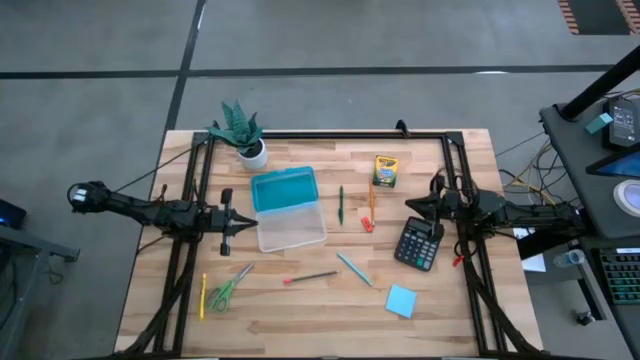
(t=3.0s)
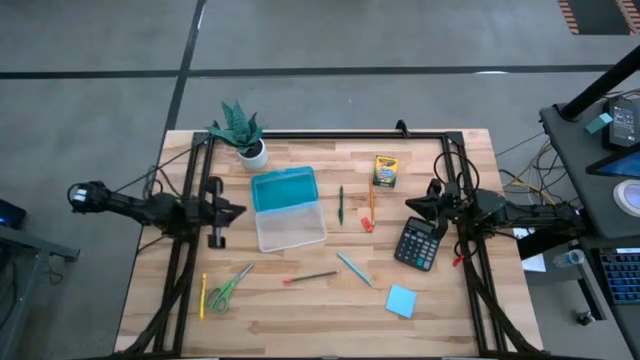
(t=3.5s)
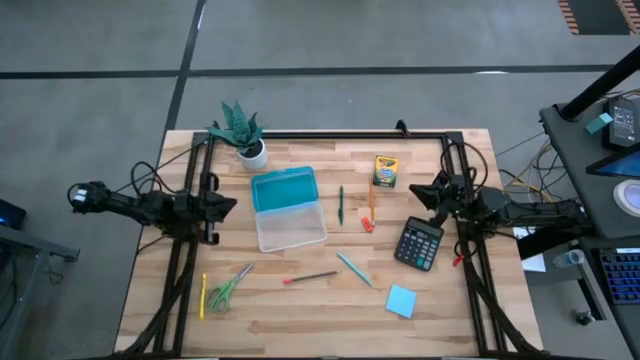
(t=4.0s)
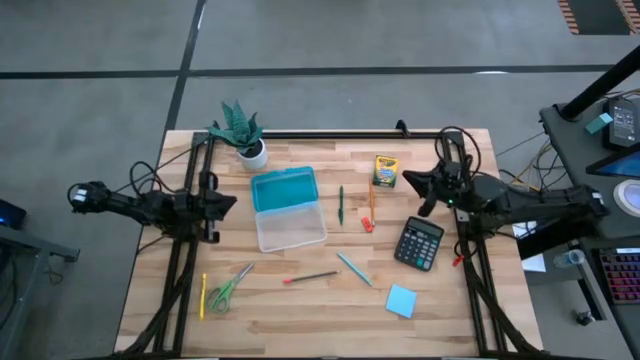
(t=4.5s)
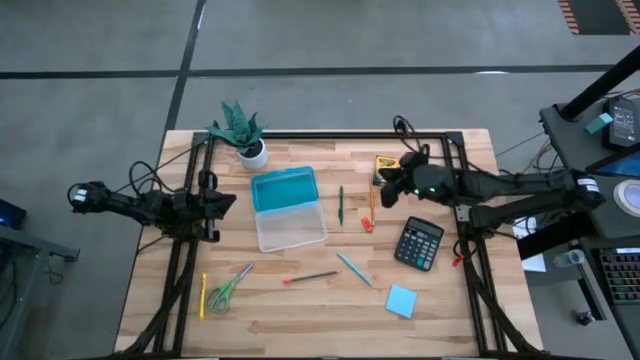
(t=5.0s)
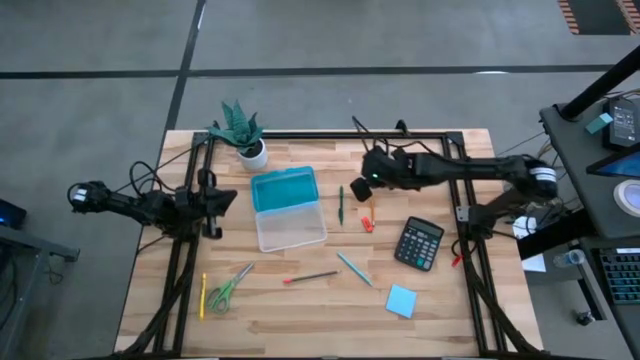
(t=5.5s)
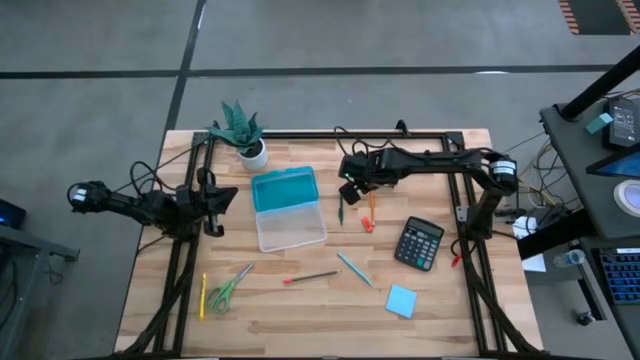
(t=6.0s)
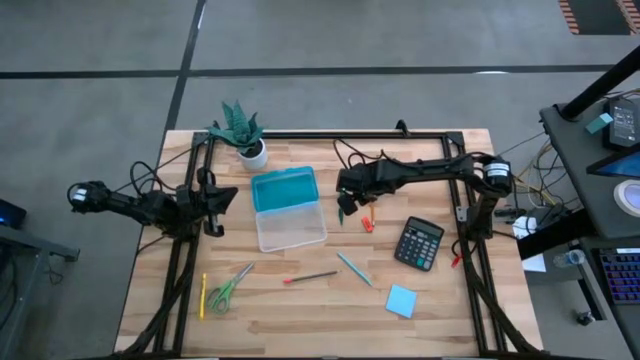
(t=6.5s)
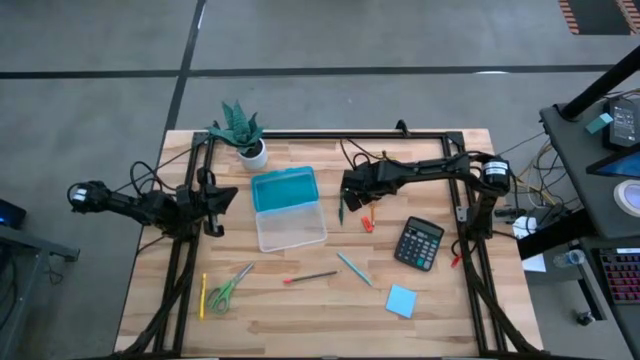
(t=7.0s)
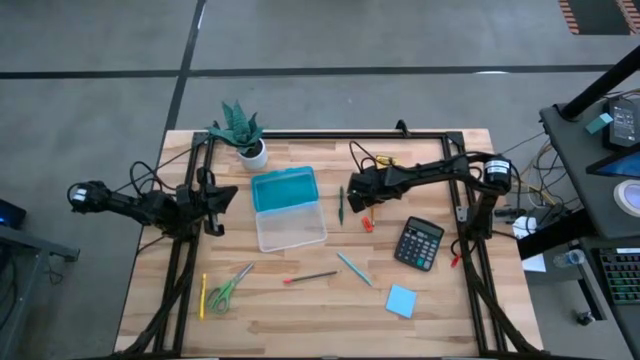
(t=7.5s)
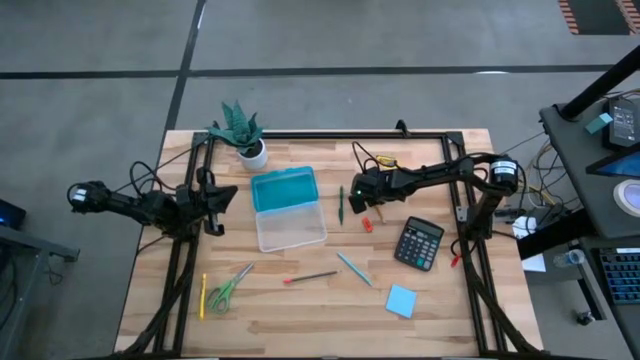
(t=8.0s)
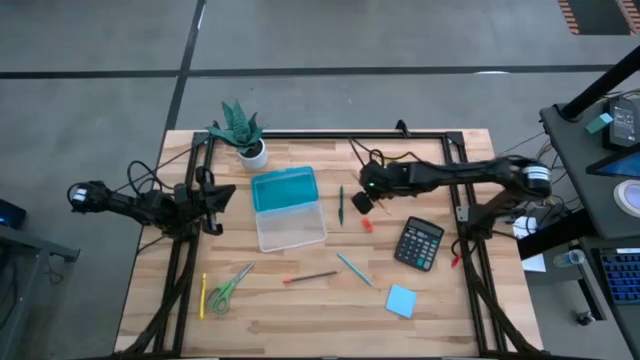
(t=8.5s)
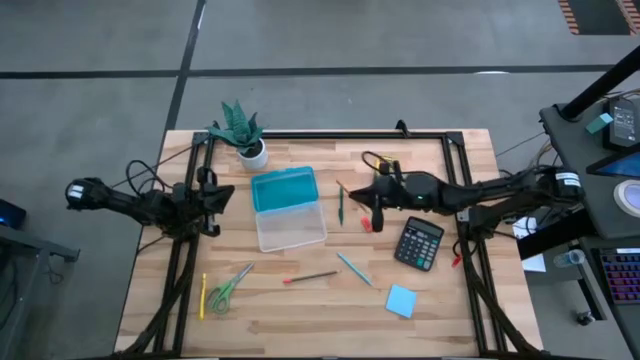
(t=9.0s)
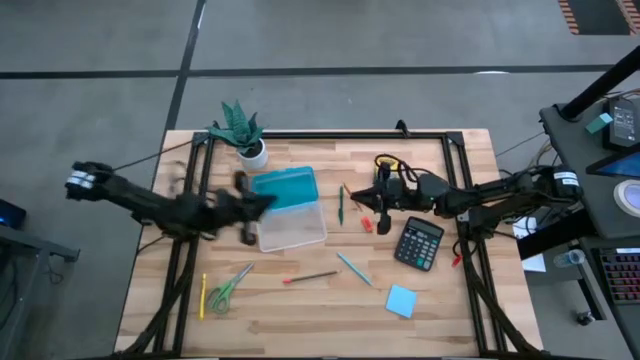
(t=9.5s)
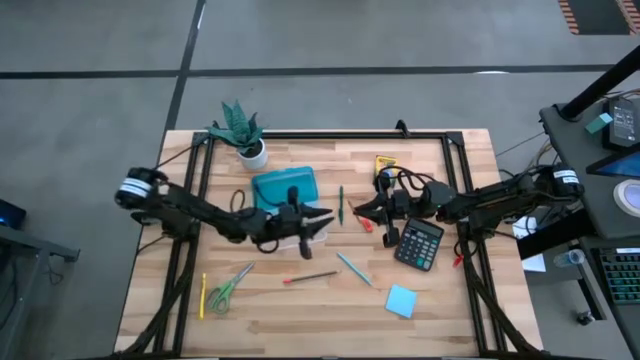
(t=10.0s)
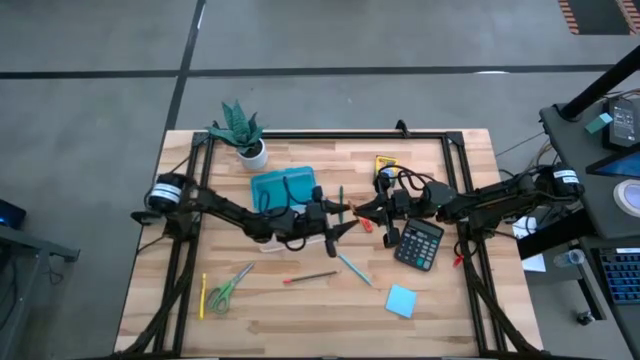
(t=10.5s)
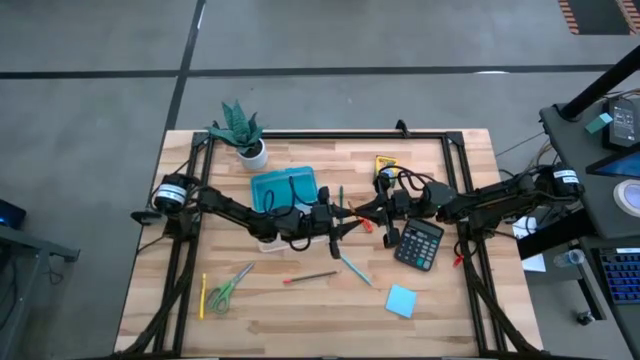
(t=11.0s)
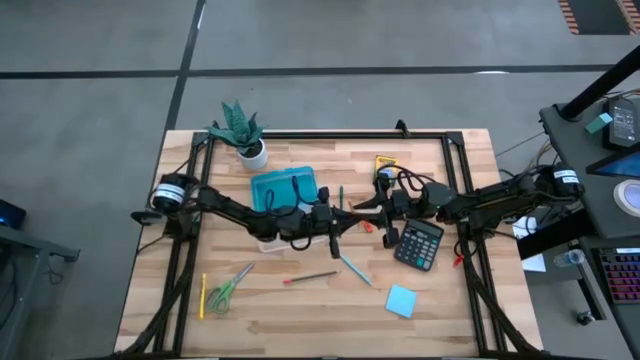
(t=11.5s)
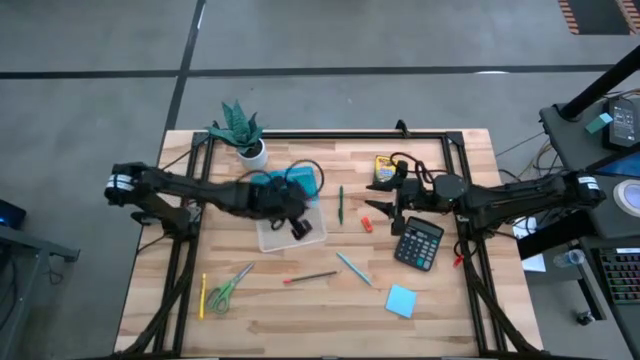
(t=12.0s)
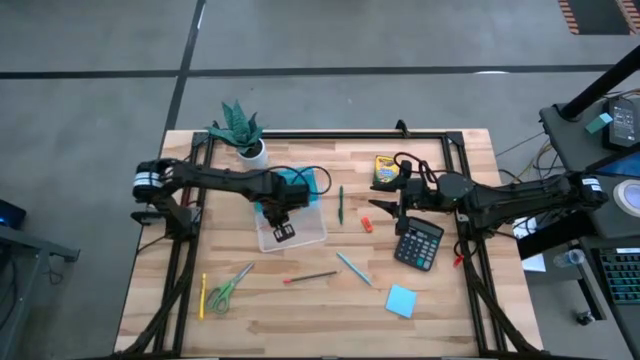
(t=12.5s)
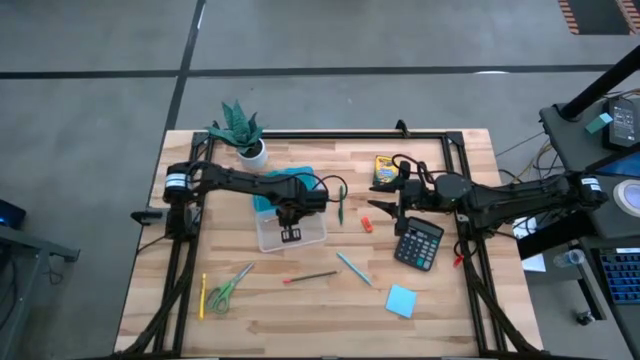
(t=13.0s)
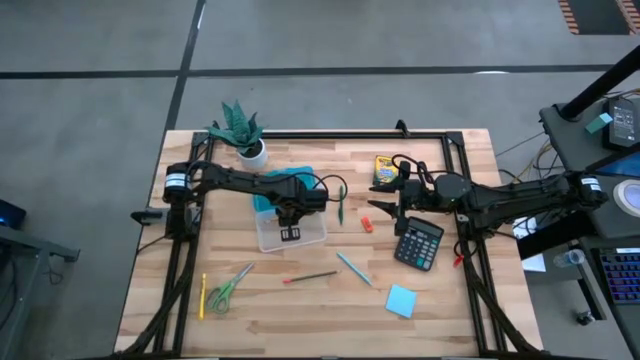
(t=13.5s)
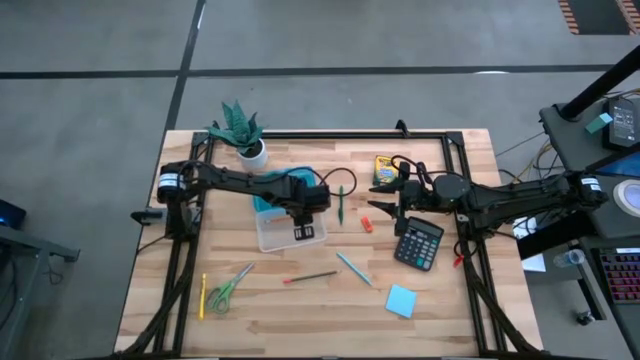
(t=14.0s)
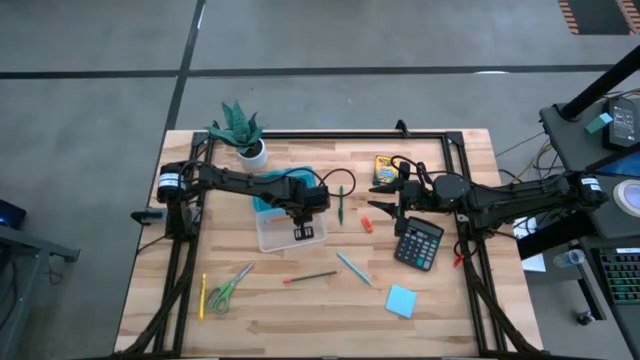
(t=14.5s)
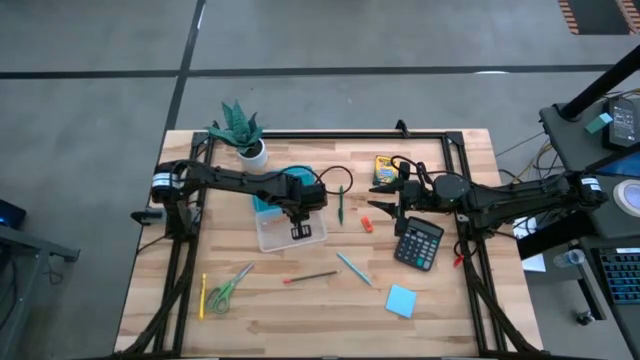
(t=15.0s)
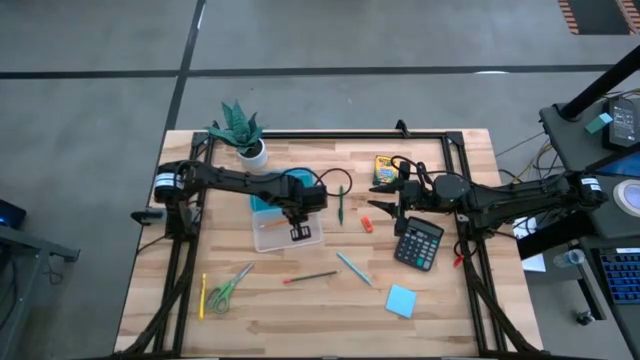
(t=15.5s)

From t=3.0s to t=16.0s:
Task: Pack school essentials
Put the orange pencil into the blue supply box

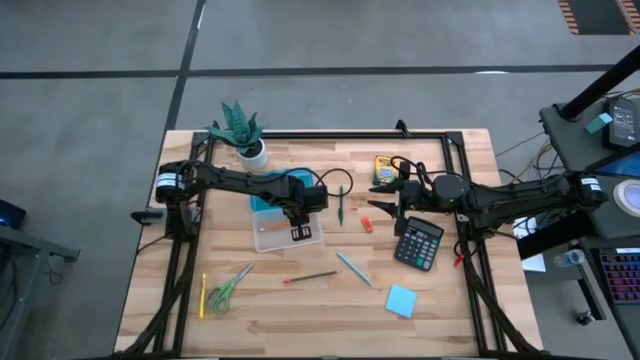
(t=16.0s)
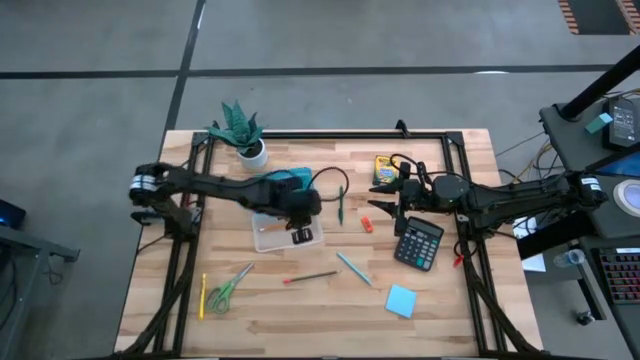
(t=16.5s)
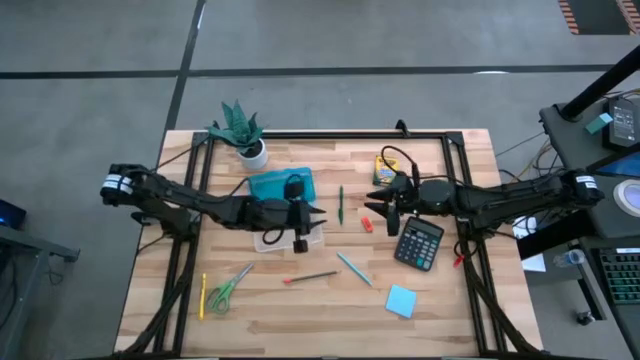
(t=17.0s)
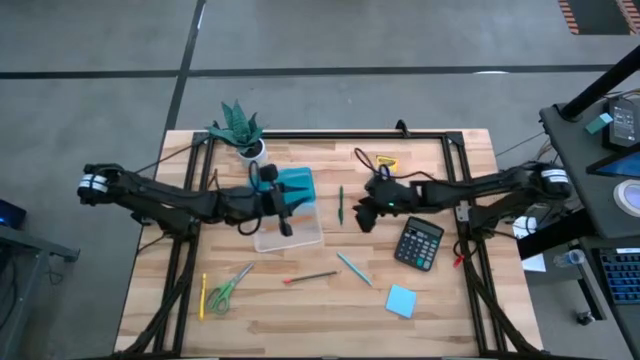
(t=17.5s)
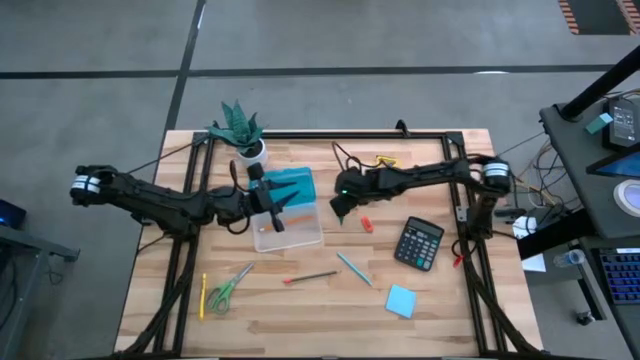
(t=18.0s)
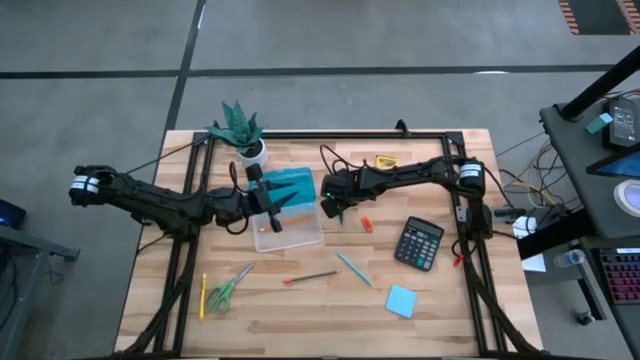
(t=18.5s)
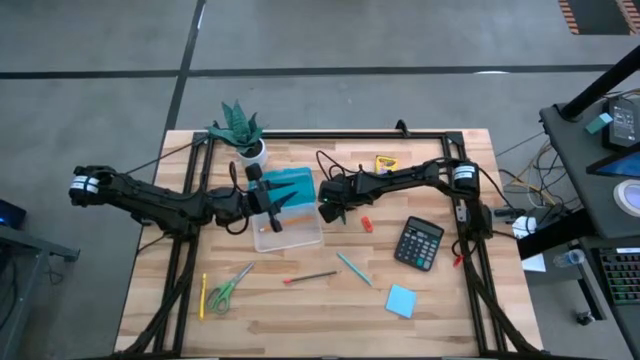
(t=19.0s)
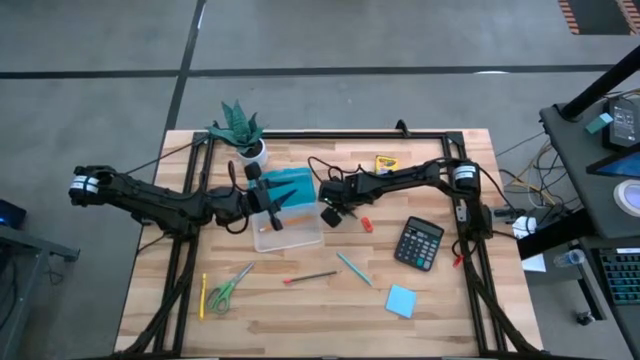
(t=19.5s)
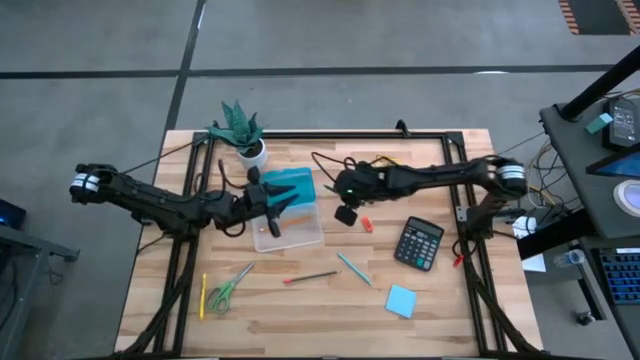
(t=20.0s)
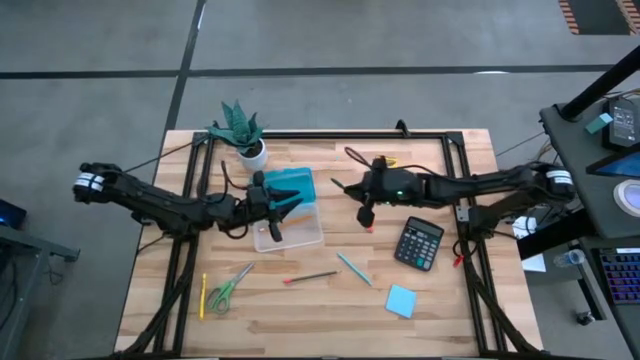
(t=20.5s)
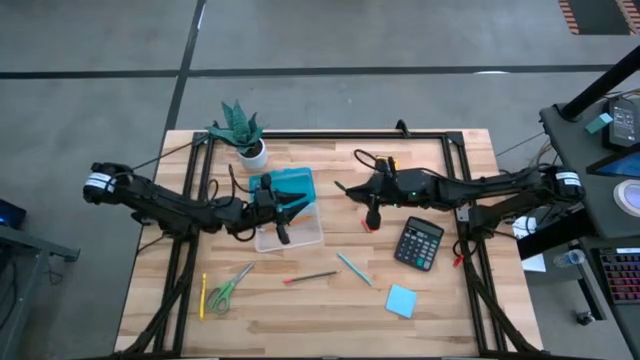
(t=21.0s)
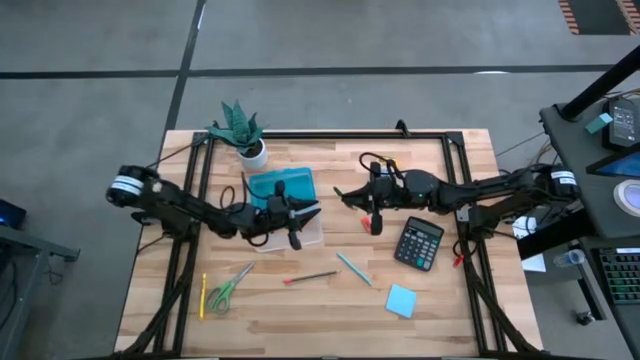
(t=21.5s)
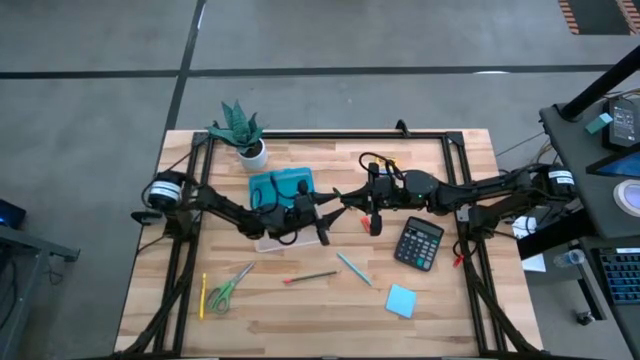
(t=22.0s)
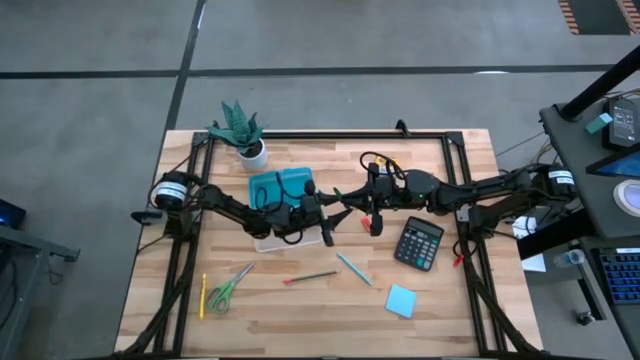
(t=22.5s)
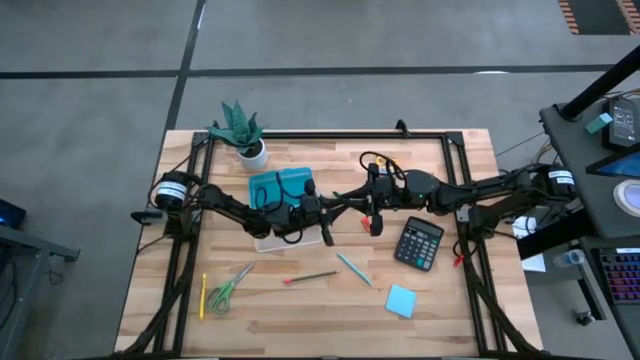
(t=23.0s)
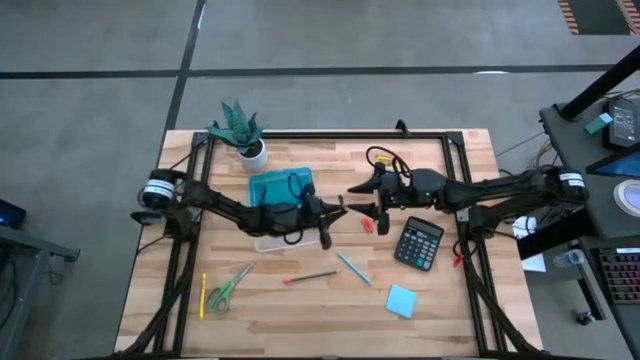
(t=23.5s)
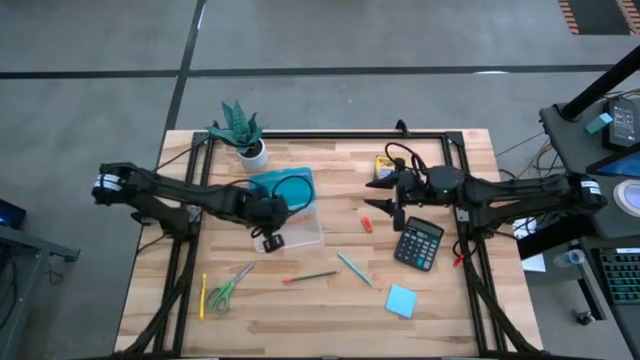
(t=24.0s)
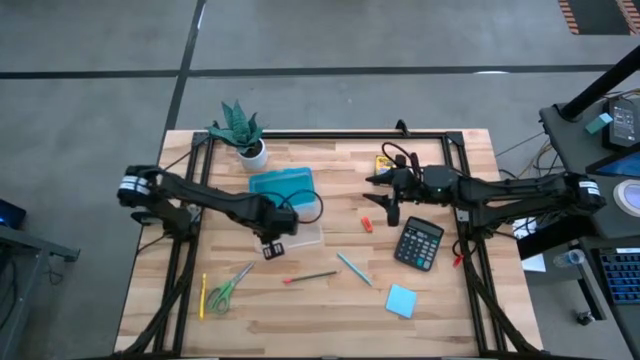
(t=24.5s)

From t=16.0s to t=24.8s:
Put the green pen into the blue supply box
